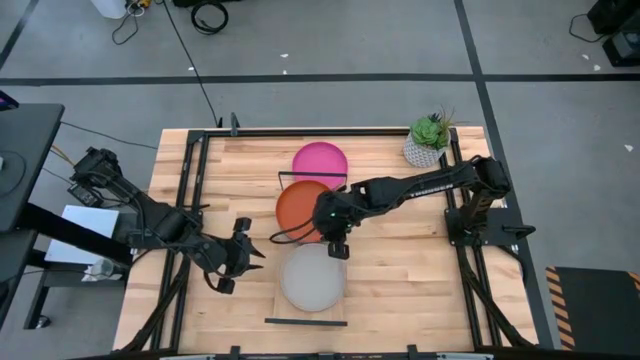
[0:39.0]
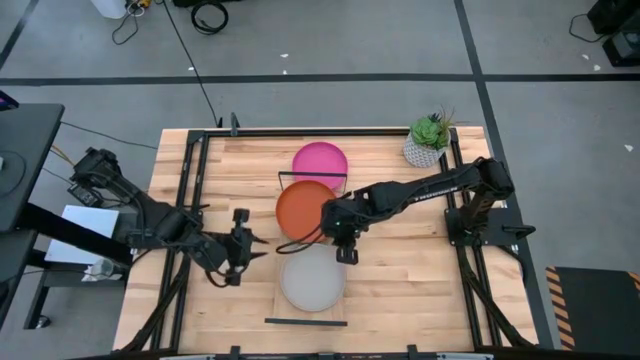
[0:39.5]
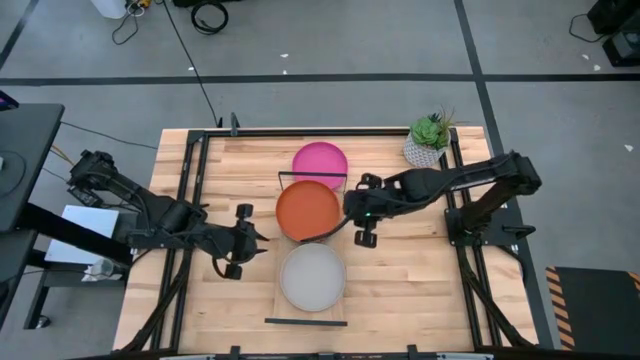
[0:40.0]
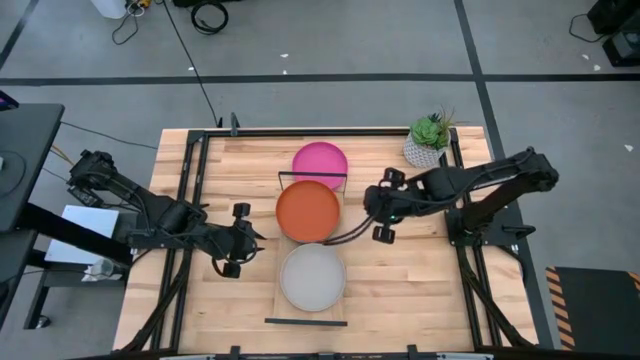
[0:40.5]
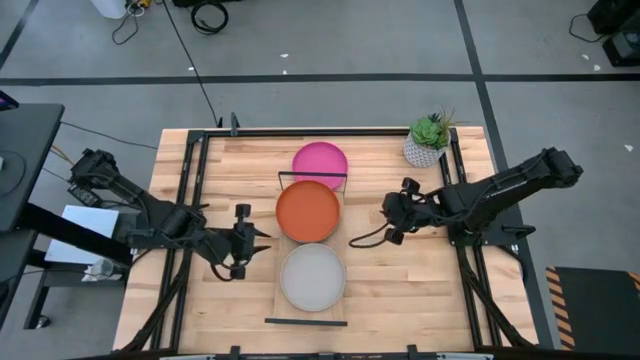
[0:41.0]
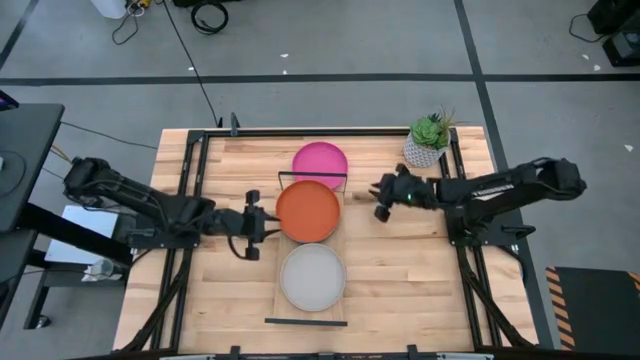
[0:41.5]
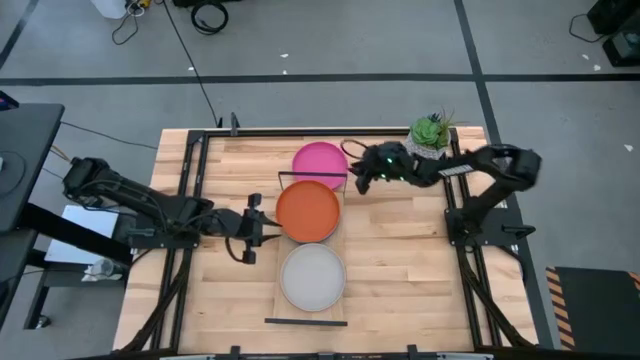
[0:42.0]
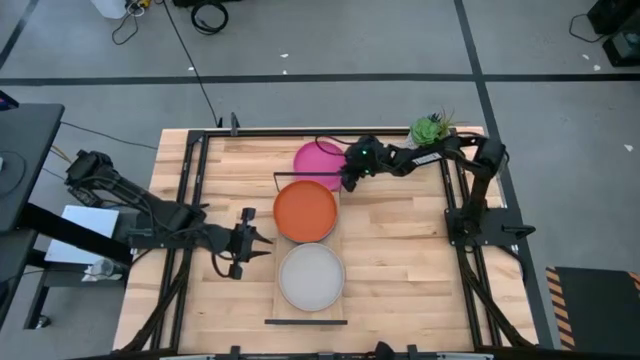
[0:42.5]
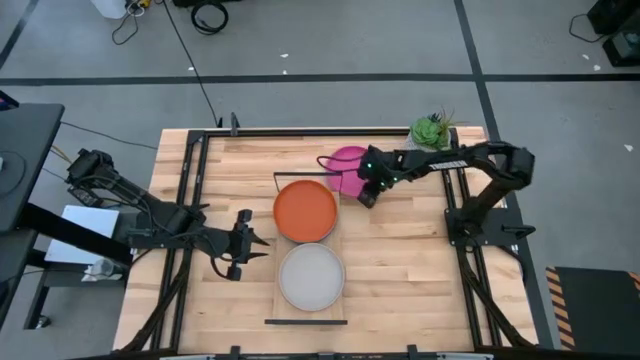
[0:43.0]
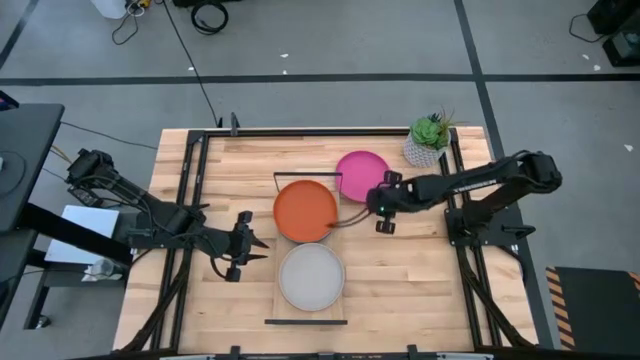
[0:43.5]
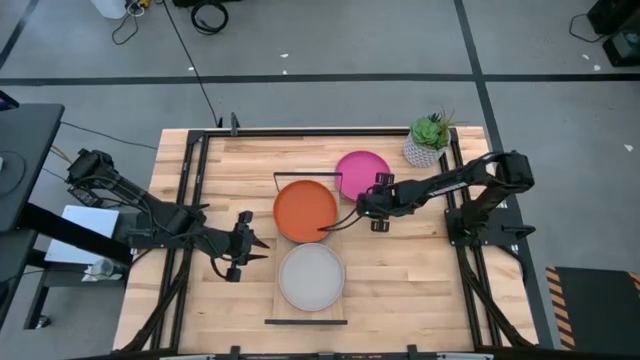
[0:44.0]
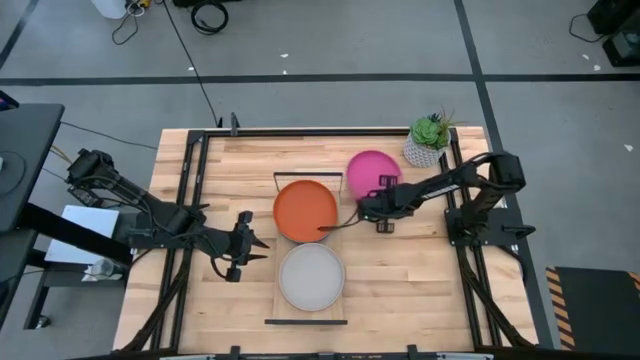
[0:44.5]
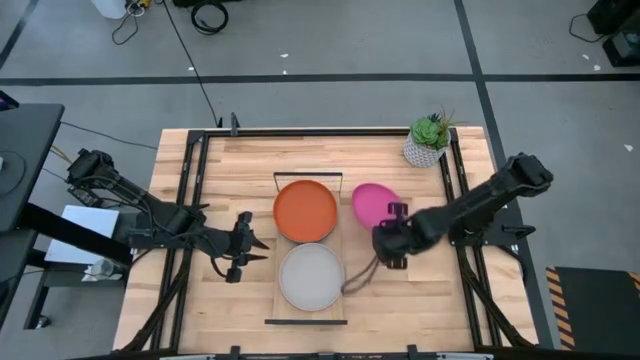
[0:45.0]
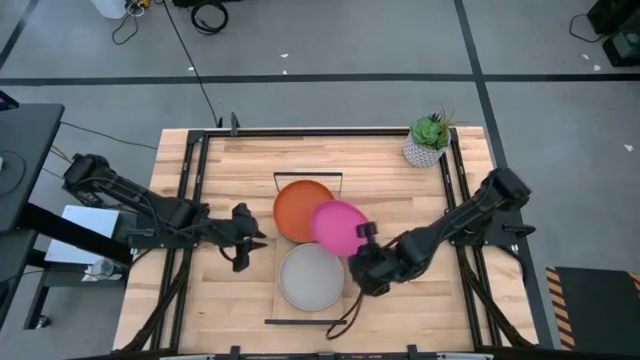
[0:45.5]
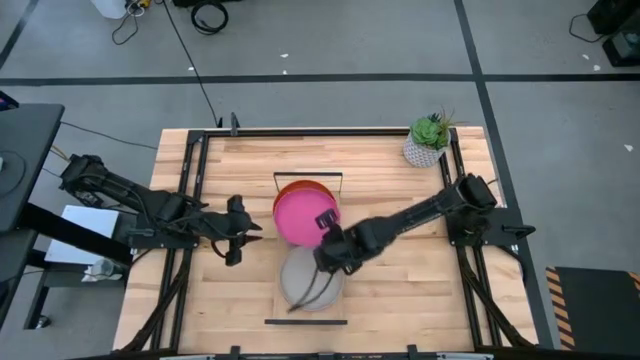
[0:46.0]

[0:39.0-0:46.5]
Task: Place and stack plates onto a shelf
Stack the pink plate on top of the gray plate

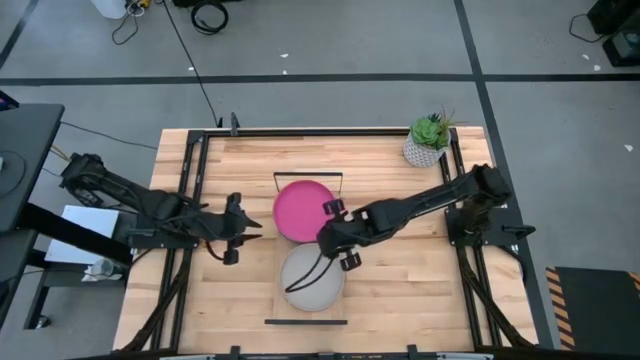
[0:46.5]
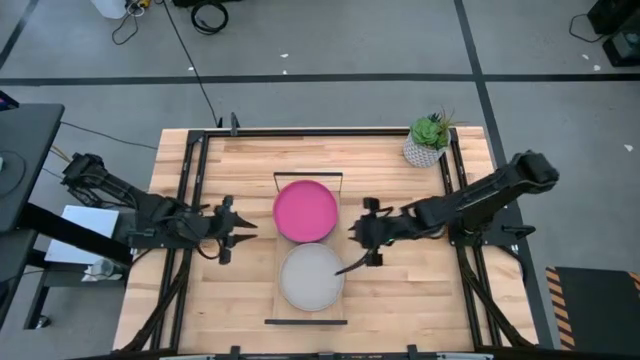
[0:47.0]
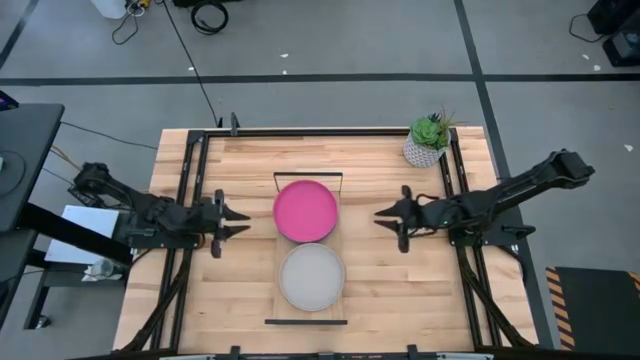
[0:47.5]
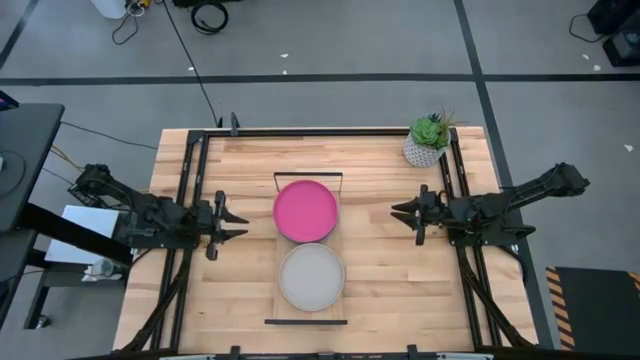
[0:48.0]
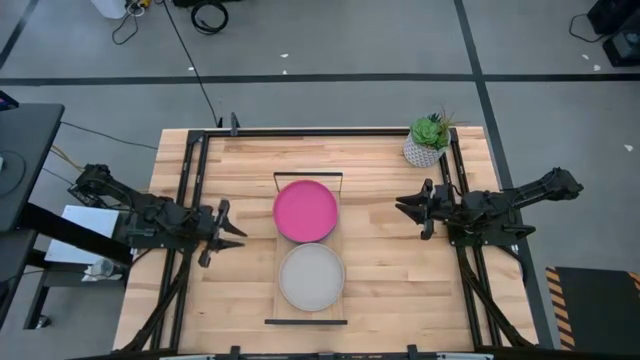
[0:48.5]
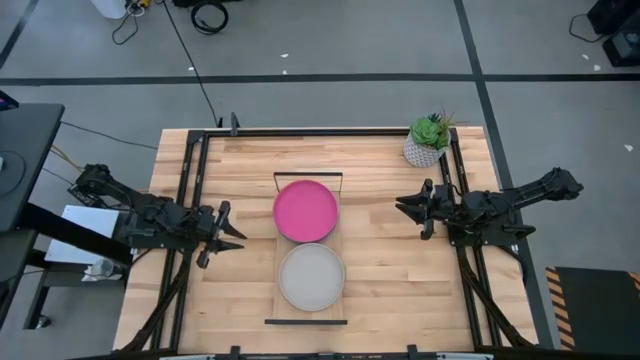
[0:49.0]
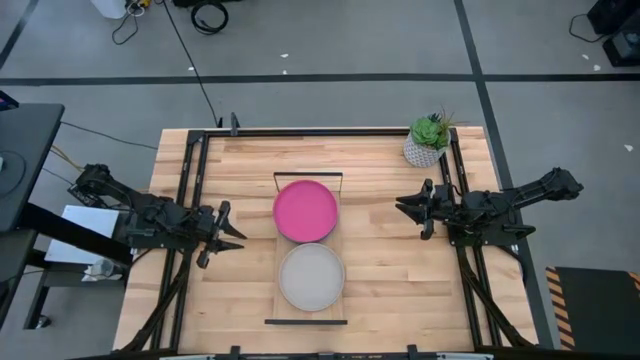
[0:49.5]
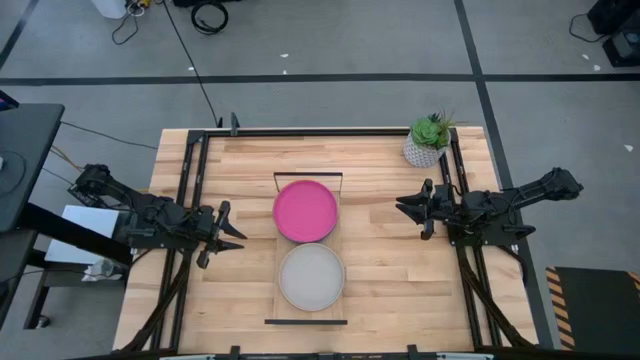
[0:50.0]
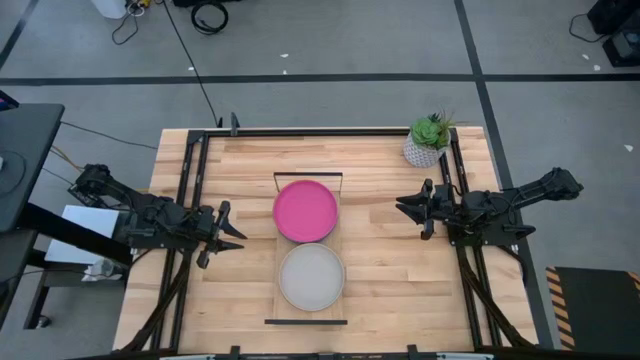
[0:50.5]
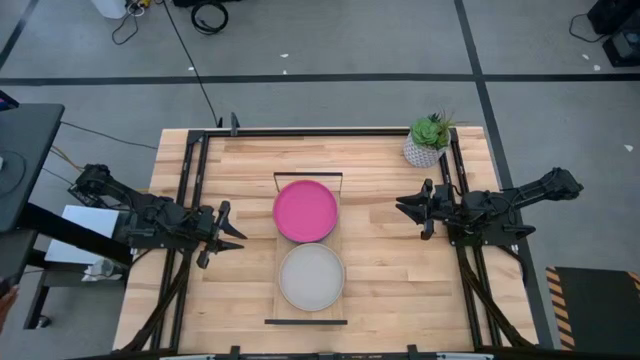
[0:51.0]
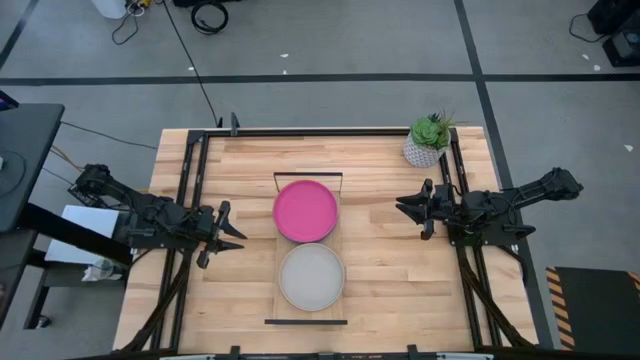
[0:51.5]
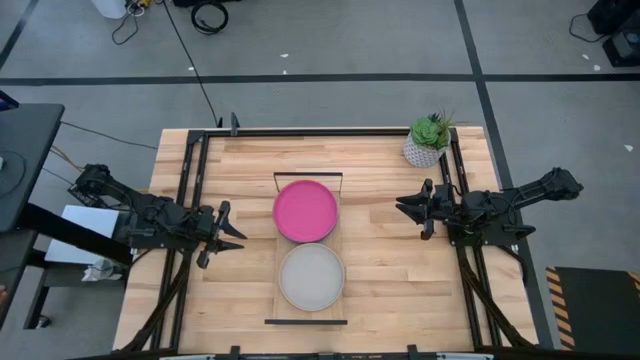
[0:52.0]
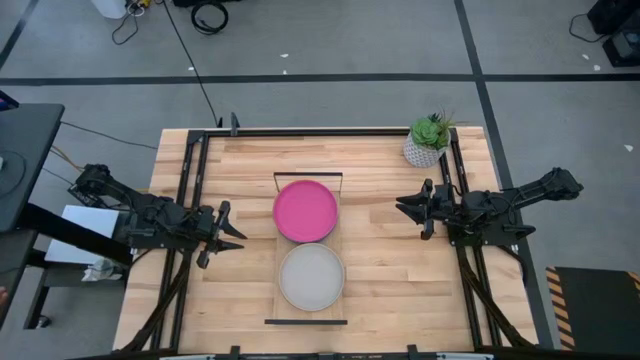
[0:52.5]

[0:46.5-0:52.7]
Return to Home Position

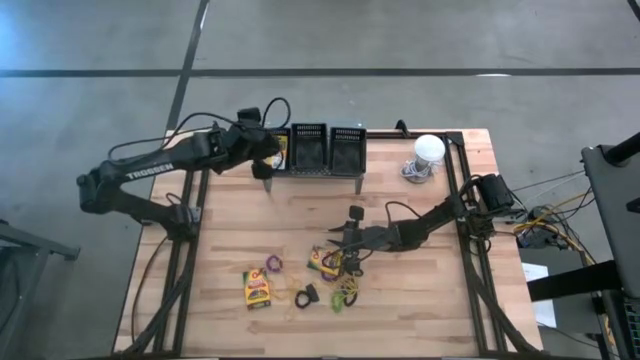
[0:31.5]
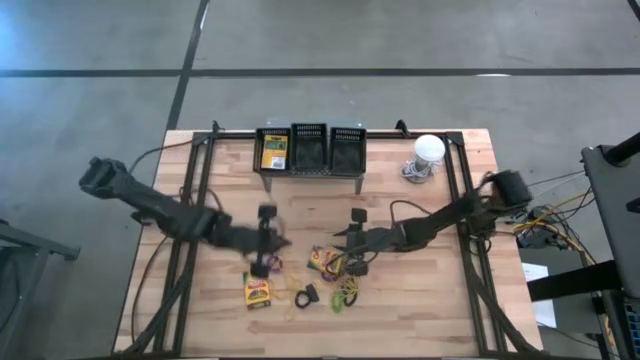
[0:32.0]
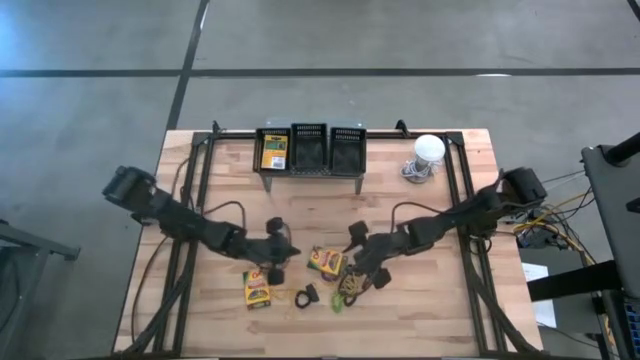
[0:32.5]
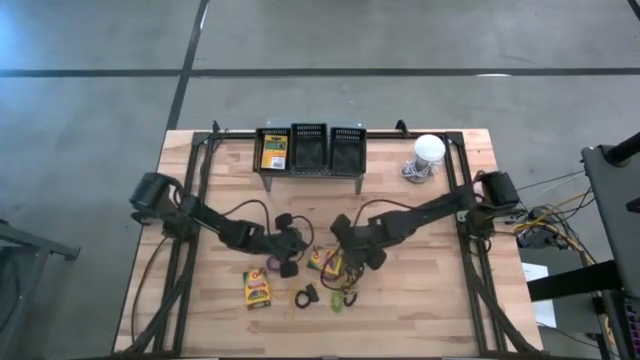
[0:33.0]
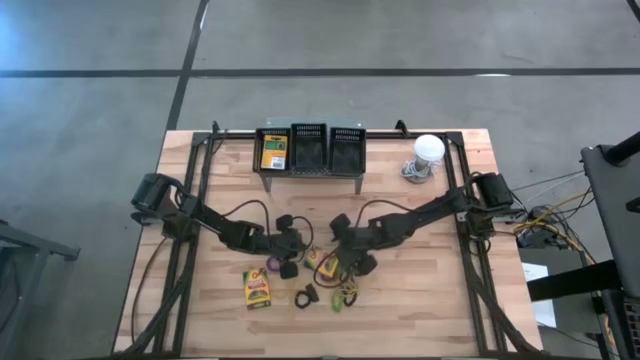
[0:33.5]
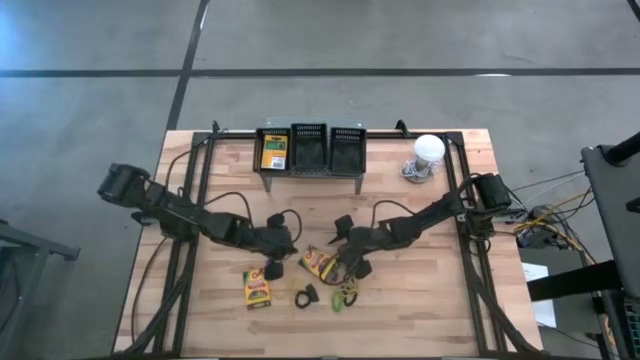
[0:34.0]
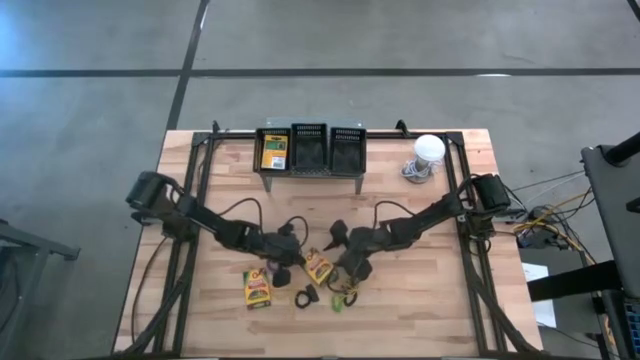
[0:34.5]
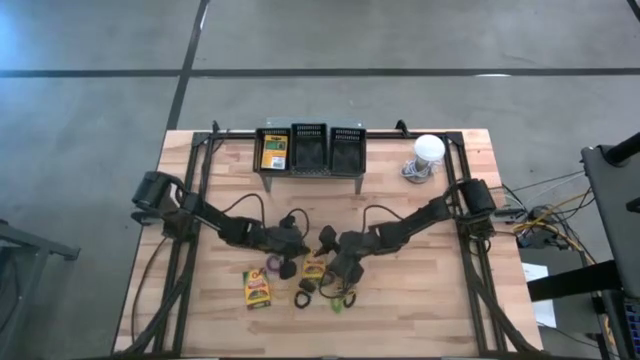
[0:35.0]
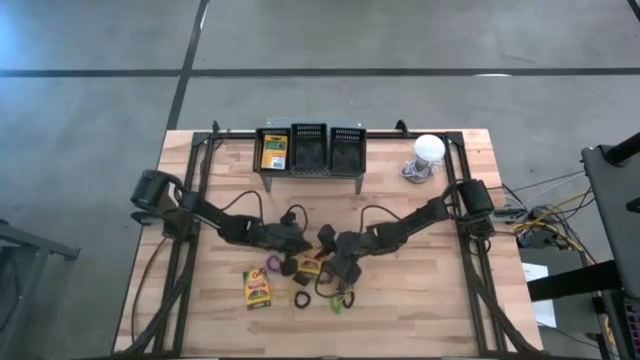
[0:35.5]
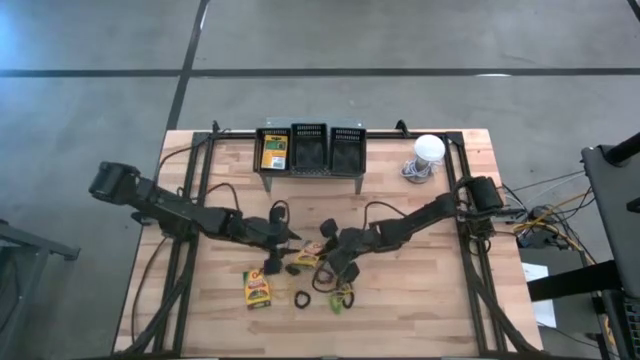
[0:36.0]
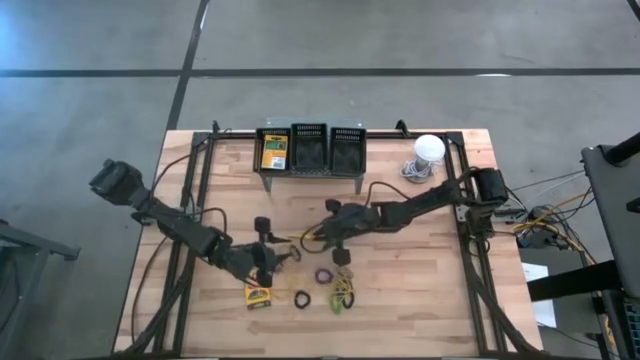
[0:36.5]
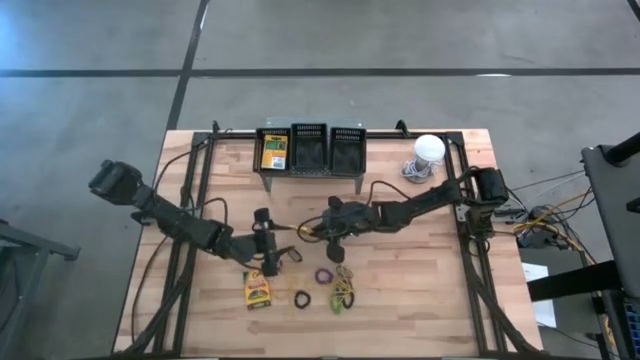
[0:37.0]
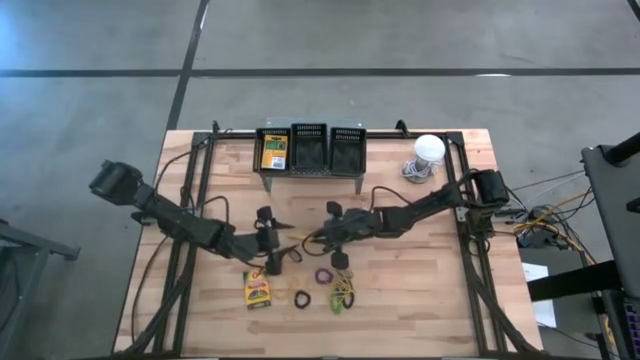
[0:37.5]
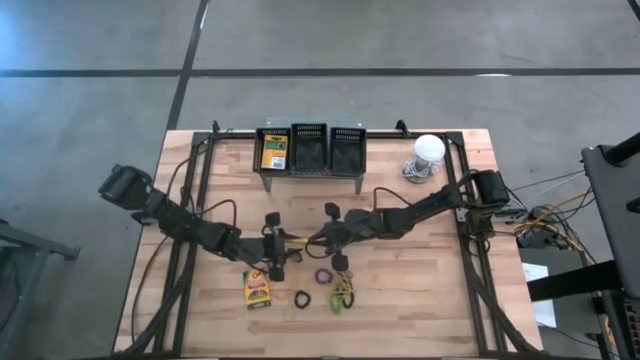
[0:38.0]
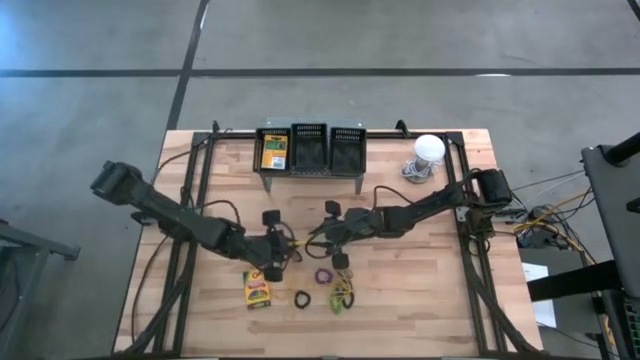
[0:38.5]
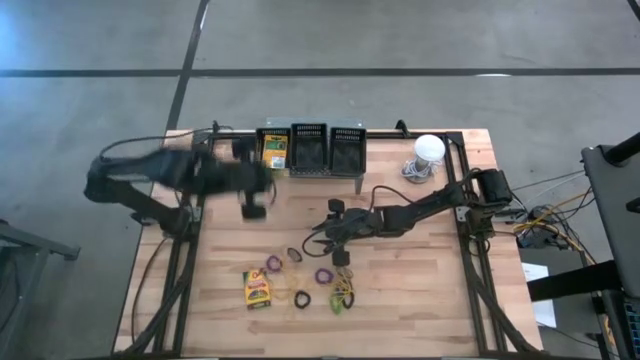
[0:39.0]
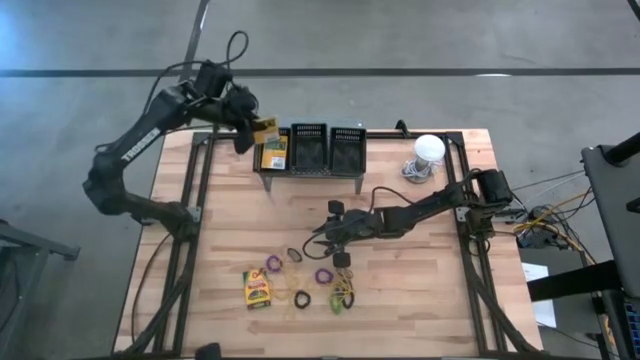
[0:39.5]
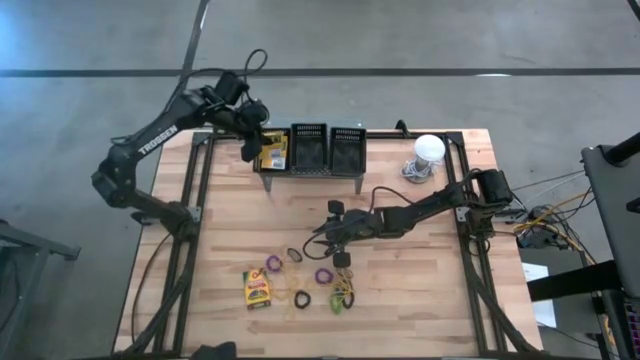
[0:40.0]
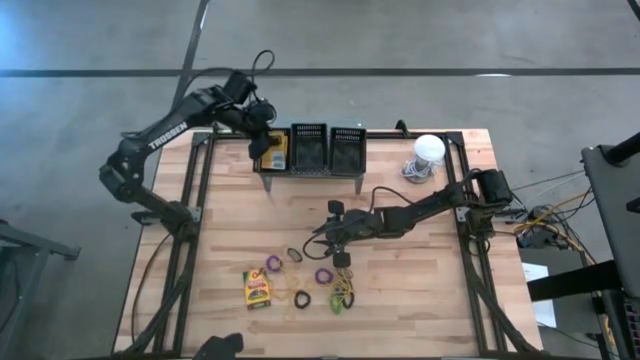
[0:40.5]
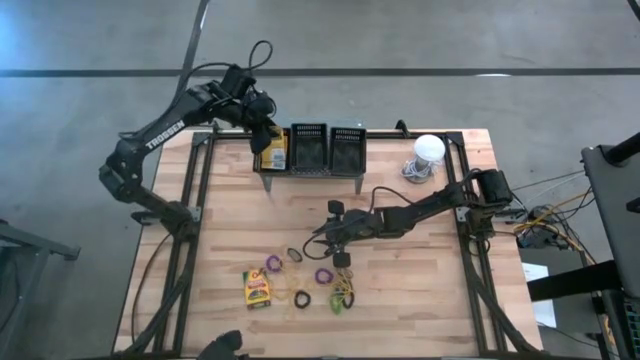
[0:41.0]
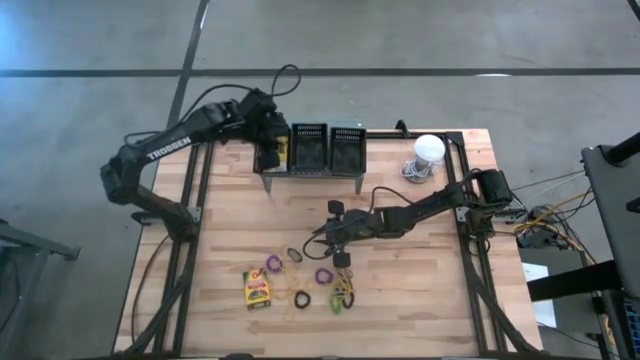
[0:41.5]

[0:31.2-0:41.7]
Task: Pick & Place Office Desk Supplies
Put the yellow crayon box into the left black basket
